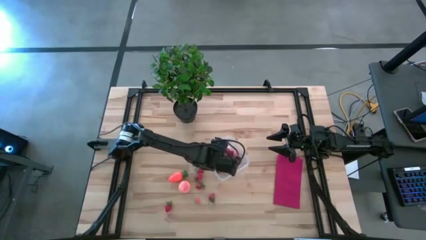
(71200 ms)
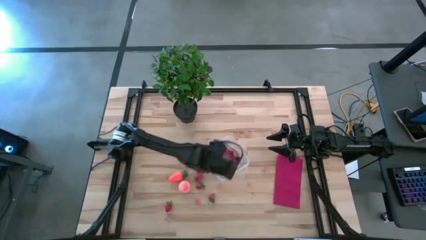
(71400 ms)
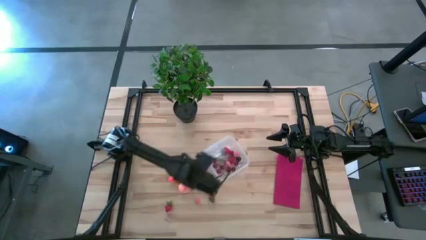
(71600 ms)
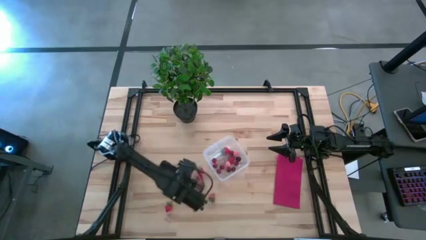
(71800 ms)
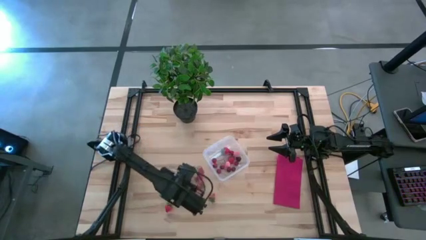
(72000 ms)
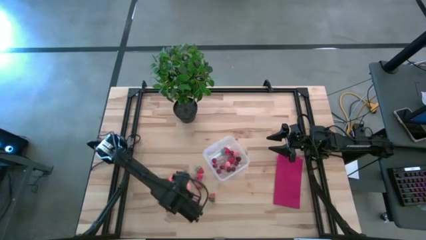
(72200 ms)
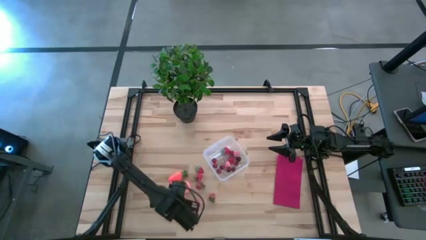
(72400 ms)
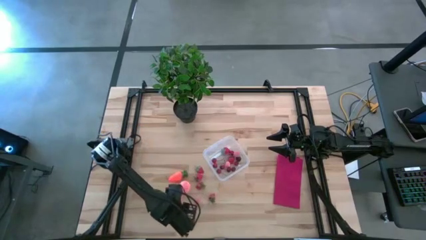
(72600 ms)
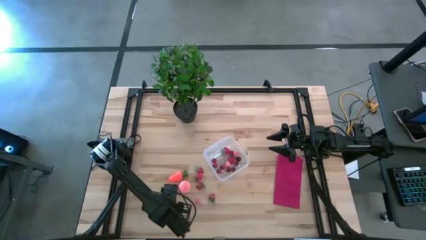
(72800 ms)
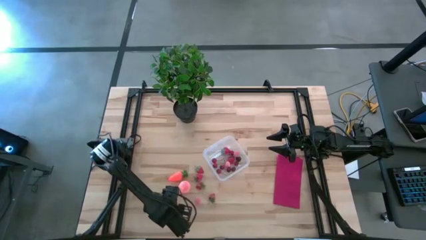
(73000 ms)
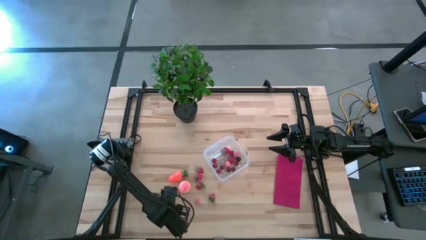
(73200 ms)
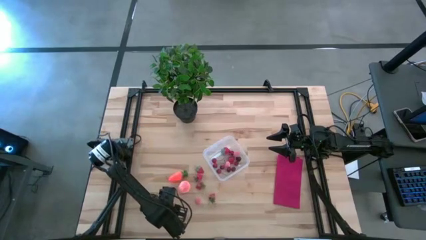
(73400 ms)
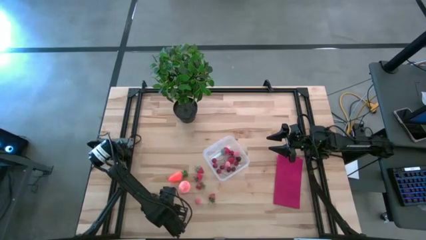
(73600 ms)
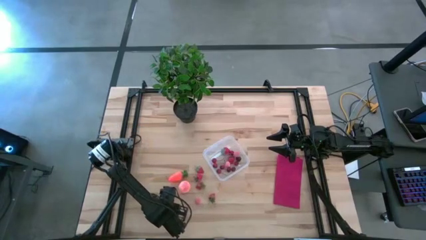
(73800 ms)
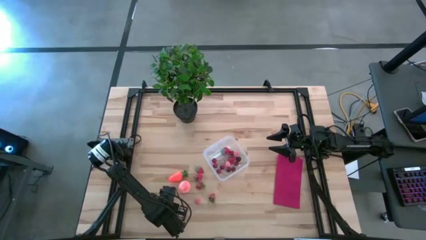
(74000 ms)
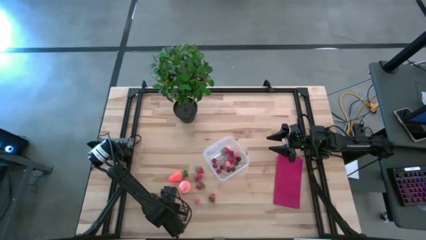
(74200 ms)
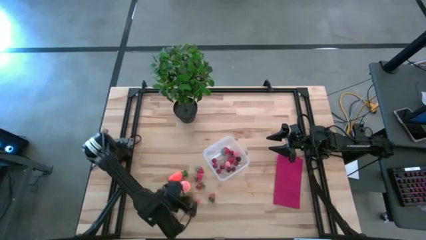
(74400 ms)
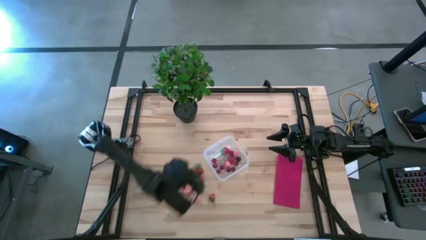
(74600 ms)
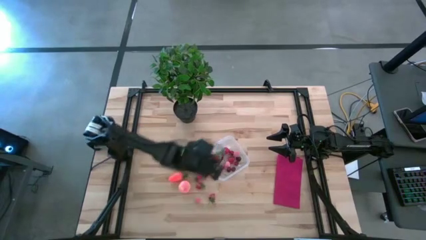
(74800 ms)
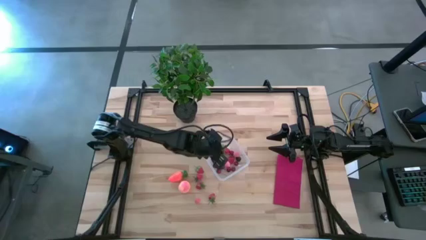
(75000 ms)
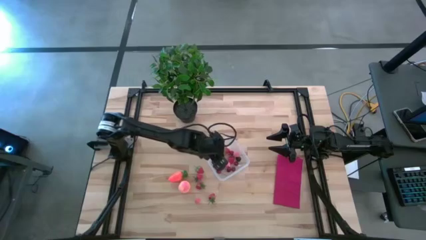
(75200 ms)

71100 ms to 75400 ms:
Task: Pick and placing Produce into tupperware
Put the red strawberry into the transparent bin

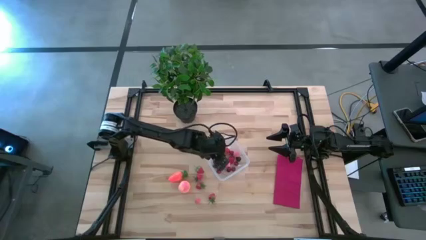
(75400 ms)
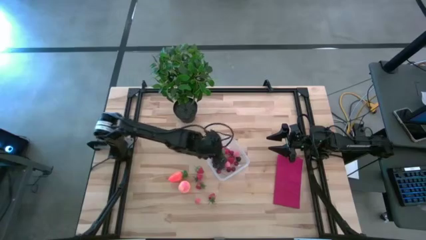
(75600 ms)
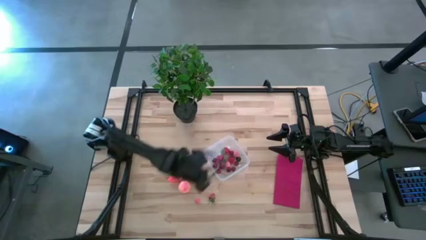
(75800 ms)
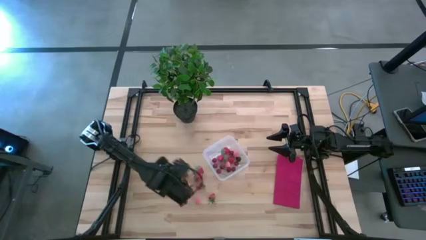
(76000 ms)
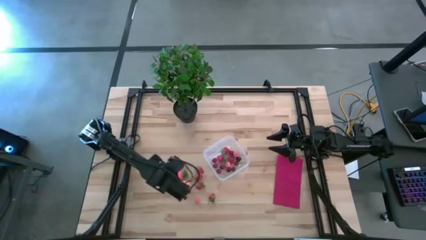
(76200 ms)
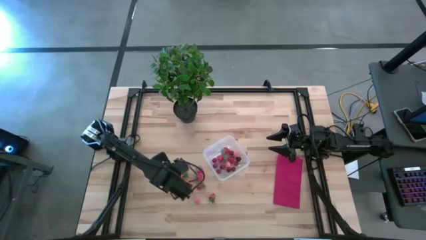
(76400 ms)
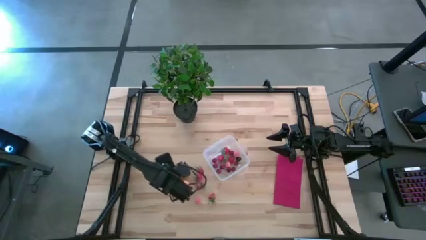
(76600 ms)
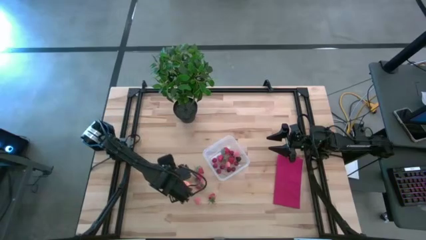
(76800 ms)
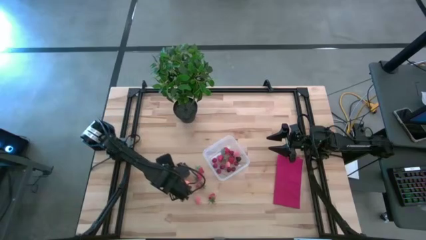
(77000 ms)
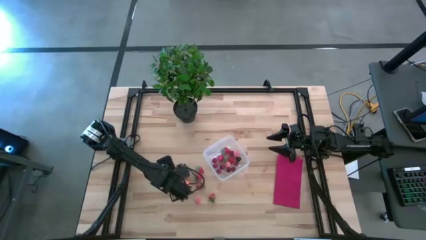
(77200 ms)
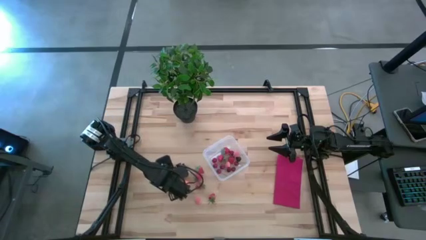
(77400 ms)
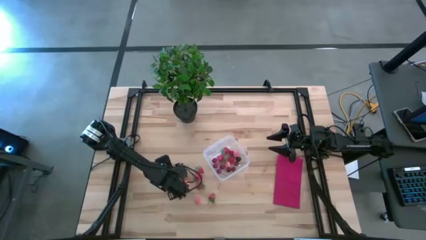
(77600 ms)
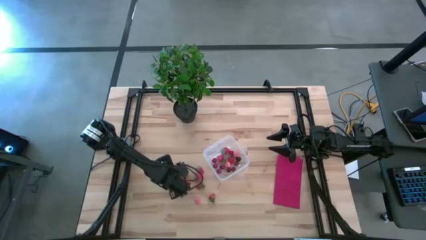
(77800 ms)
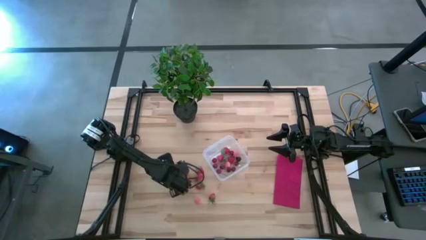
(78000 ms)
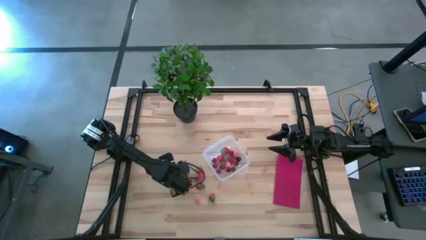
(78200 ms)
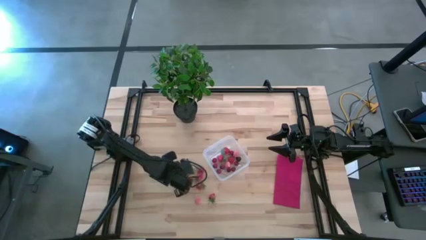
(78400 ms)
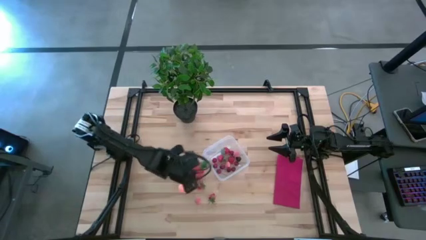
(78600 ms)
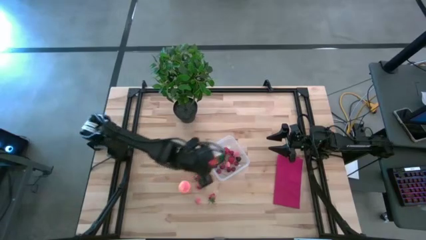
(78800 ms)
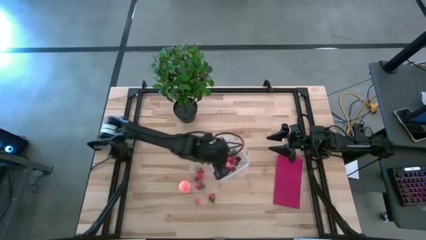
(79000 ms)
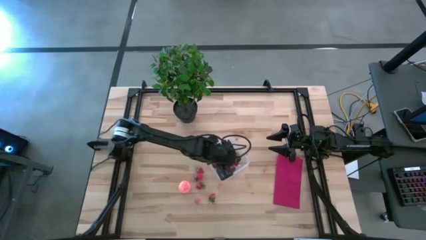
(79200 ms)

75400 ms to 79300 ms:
Put the orange carrot into the transparent bin

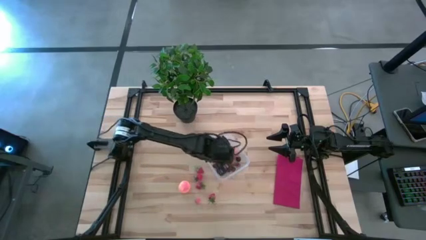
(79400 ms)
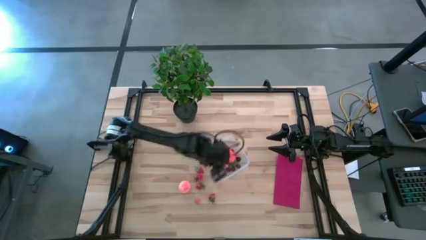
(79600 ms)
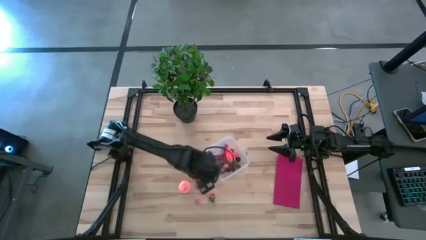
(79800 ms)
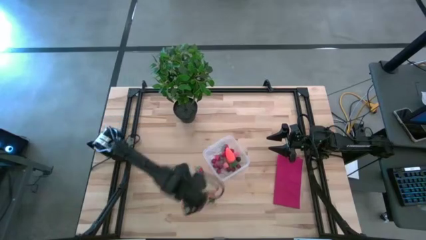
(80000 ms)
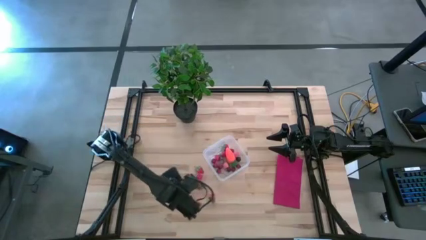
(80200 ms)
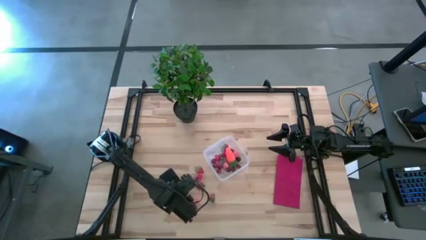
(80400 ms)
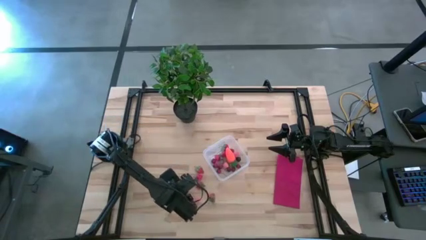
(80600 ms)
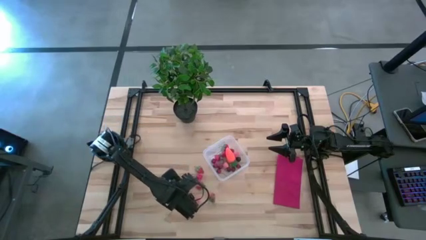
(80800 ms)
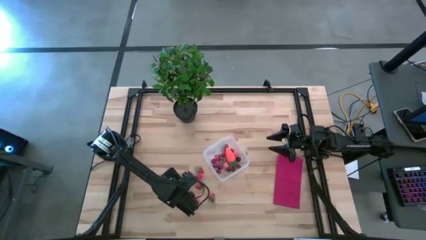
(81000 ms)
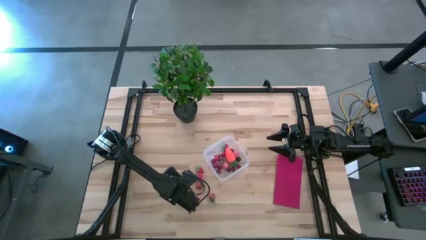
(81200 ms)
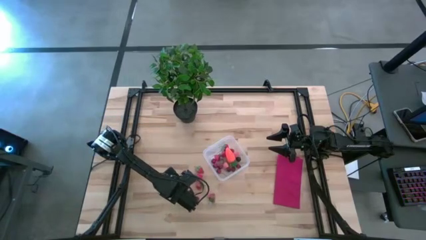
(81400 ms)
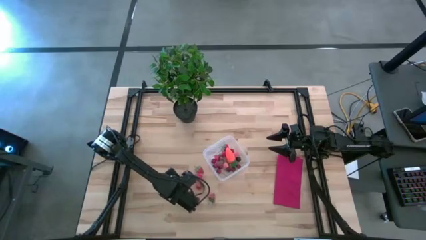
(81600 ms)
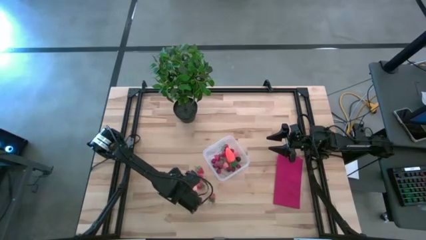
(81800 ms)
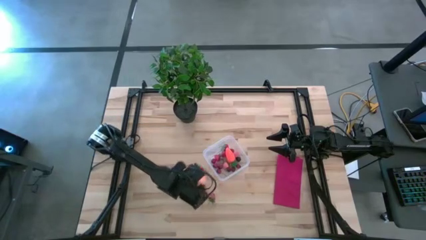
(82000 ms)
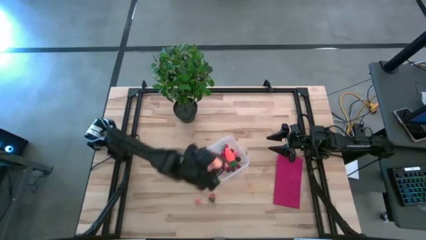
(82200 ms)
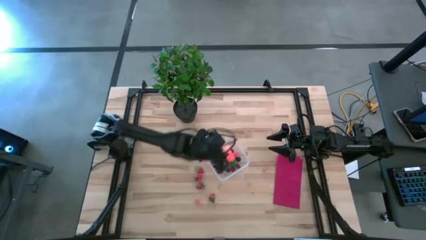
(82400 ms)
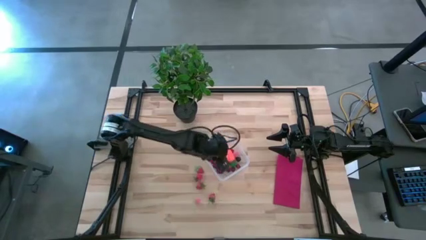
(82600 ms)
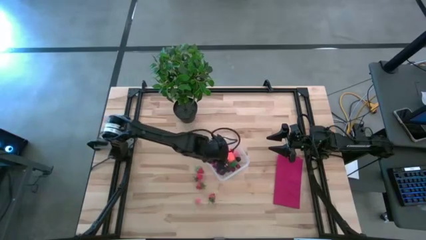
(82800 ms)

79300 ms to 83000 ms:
Put the pink peach into the transparent bin

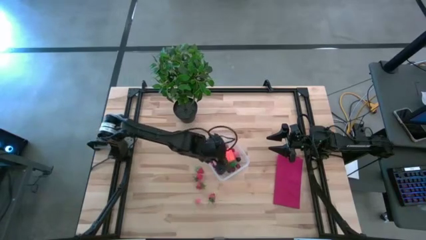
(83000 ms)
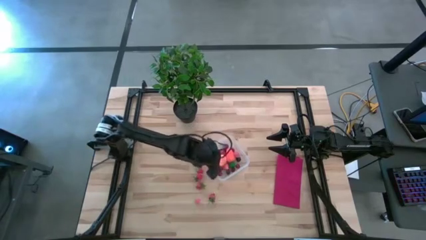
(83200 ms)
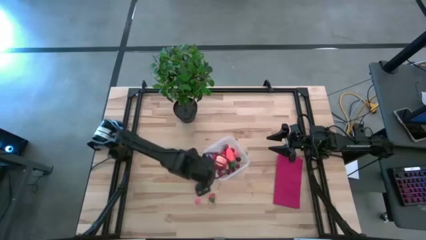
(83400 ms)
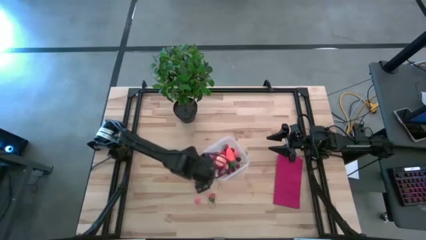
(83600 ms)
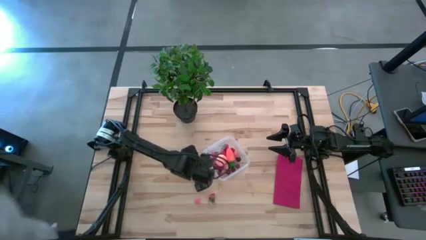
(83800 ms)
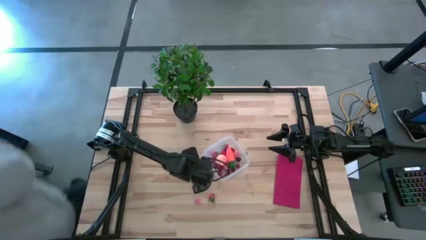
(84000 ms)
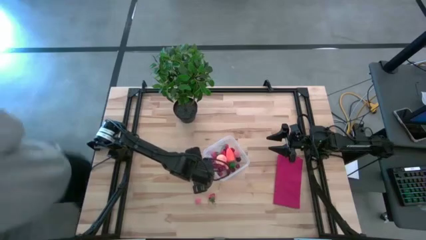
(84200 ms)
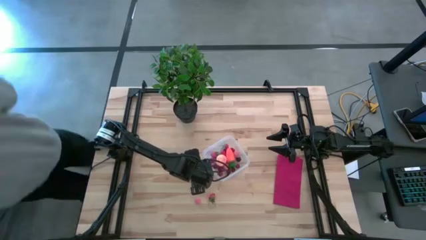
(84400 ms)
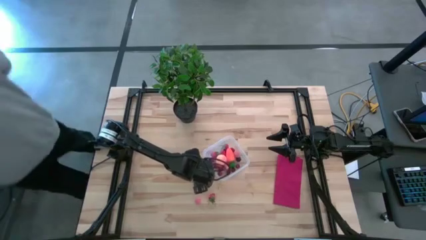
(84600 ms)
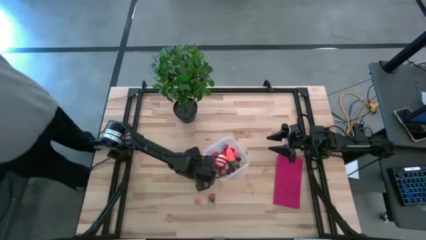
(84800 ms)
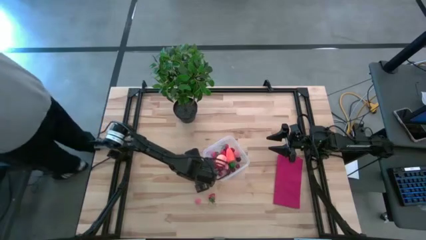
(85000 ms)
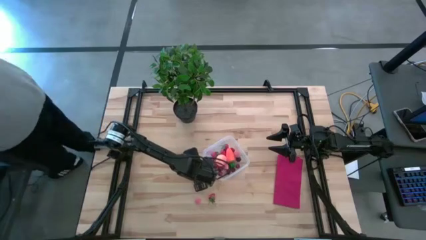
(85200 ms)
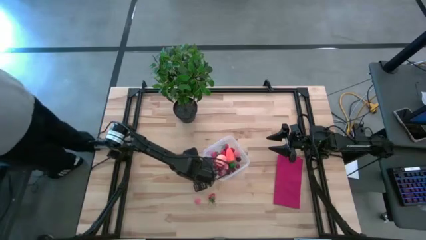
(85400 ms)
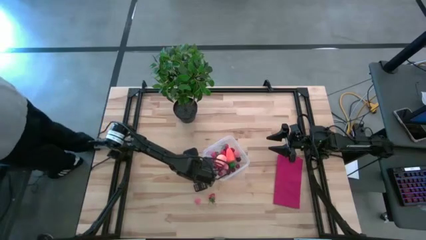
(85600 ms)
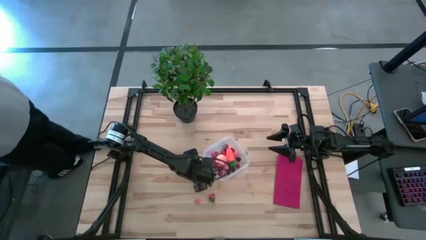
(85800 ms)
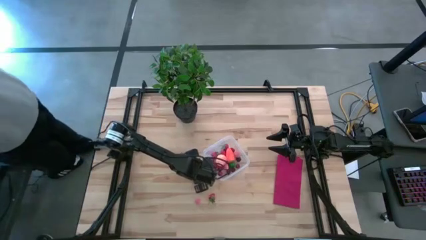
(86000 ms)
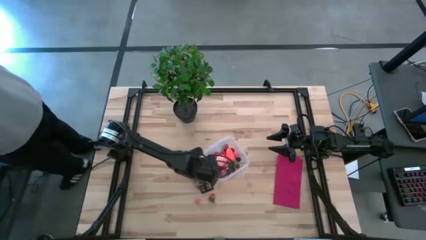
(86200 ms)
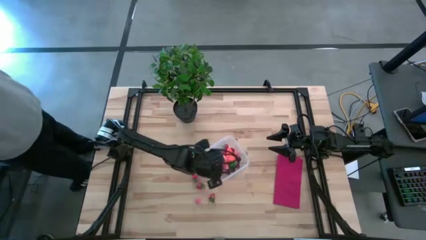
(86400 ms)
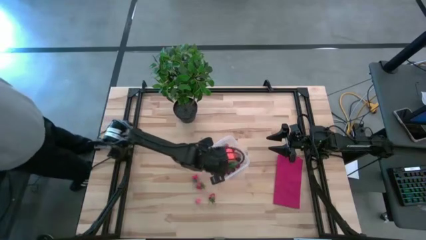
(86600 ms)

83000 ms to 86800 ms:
Put the red strawberry into the transparent bin

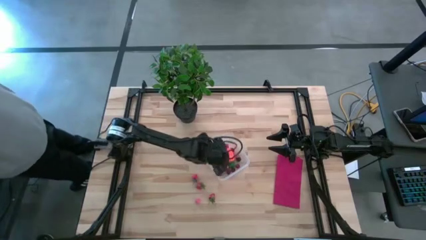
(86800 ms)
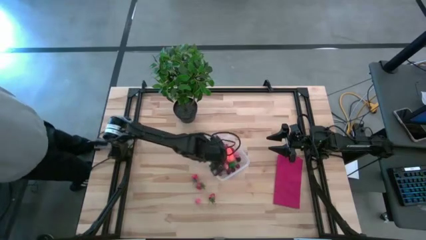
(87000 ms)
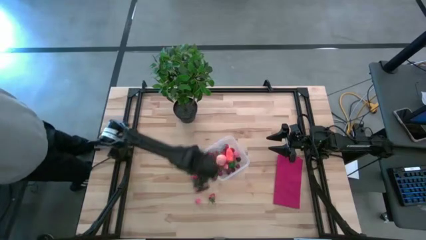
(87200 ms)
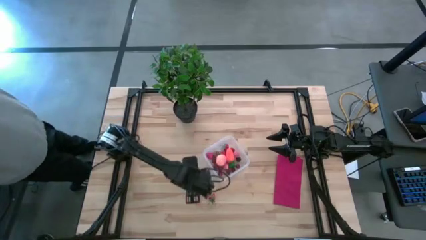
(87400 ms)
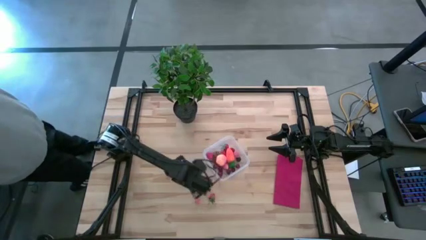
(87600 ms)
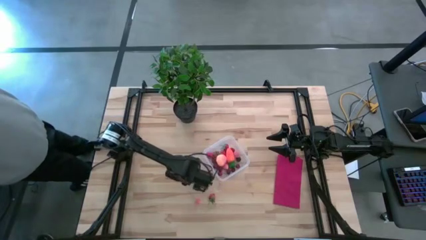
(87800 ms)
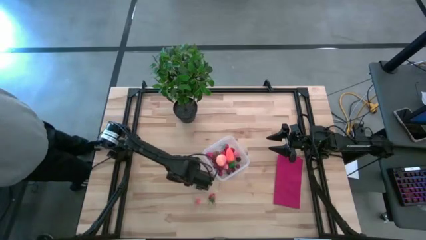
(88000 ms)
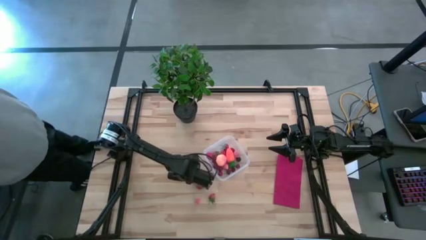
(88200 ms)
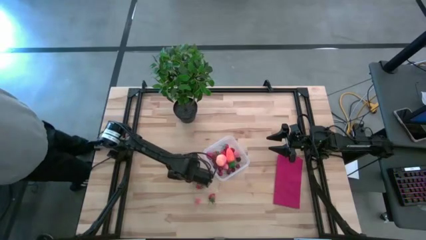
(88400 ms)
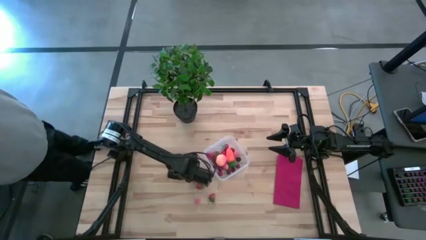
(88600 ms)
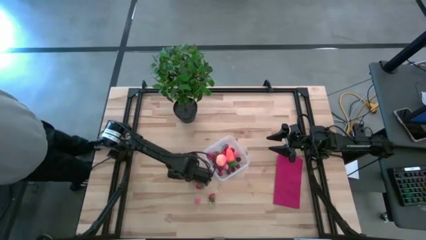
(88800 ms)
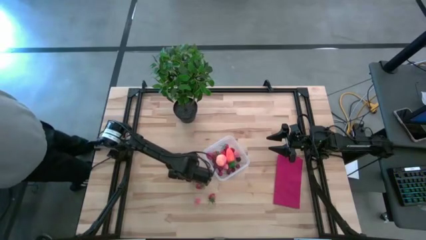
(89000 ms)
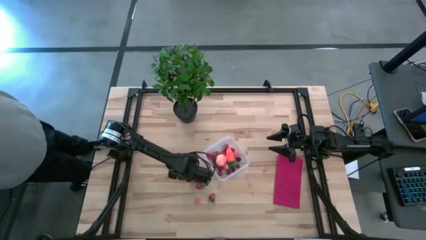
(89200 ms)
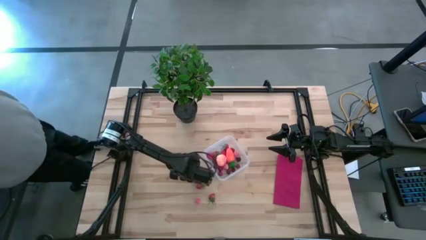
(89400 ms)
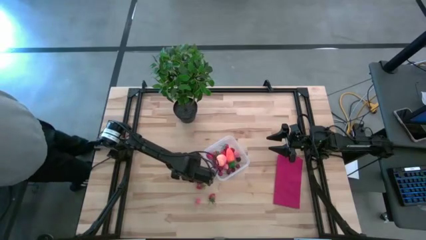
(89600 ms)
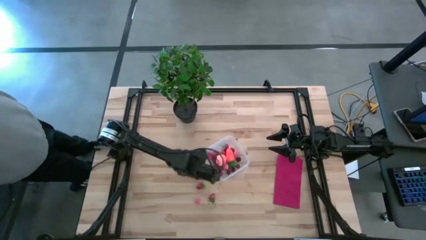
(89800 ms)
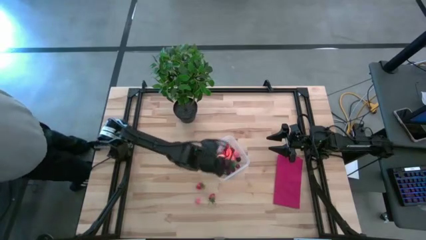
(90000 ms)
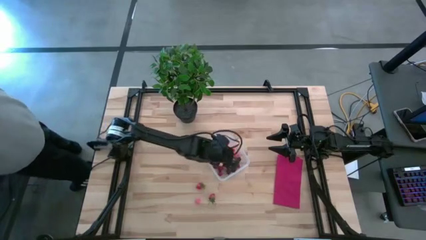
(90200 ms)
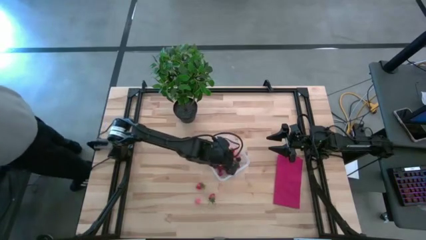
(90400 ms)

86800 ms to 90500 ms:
Put the red strawberry into the transparent bin
